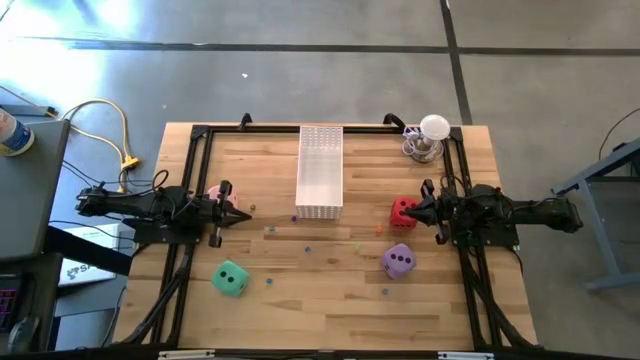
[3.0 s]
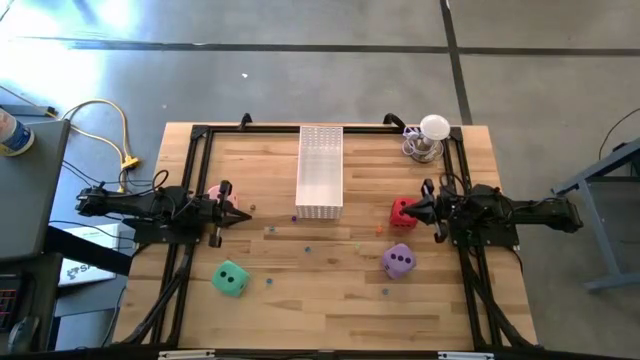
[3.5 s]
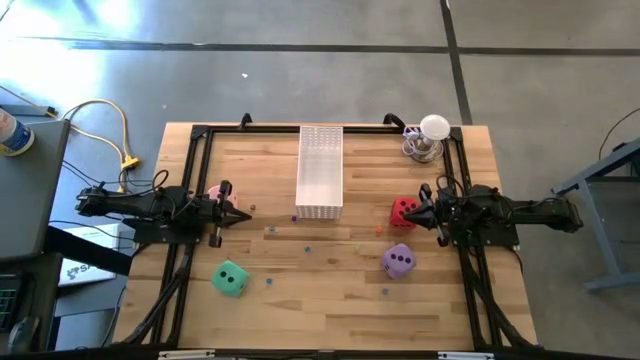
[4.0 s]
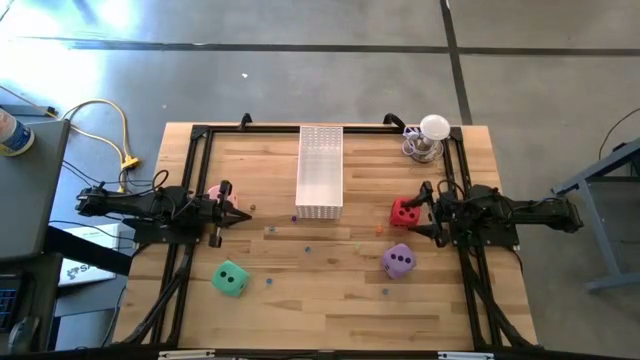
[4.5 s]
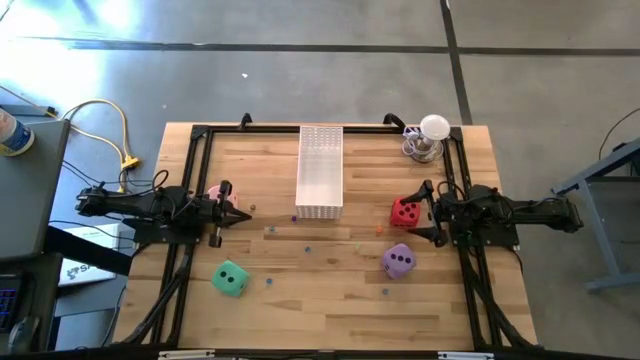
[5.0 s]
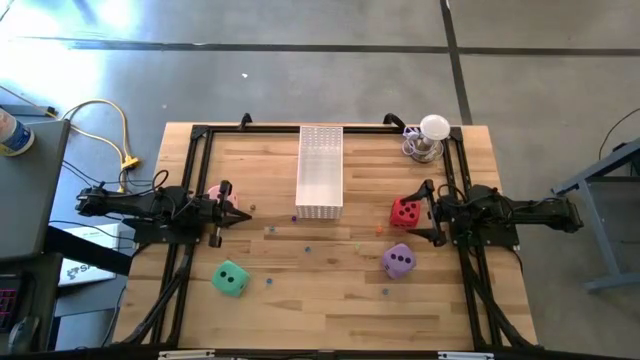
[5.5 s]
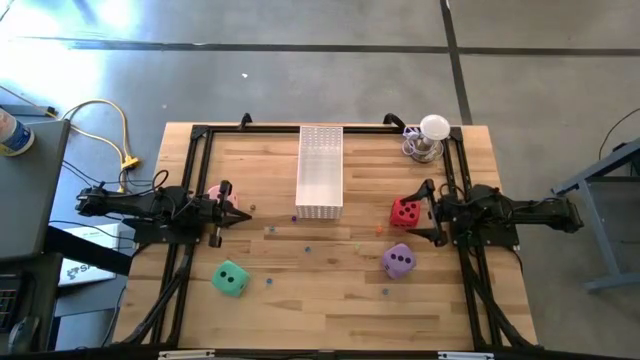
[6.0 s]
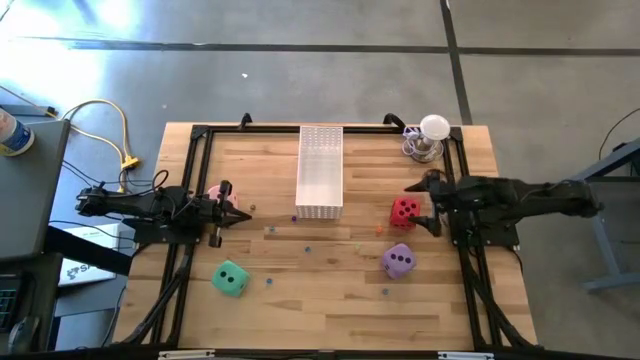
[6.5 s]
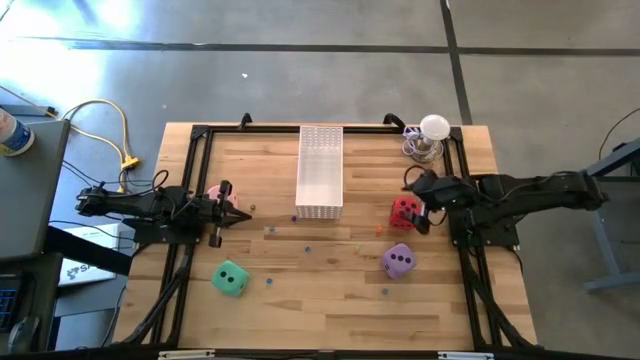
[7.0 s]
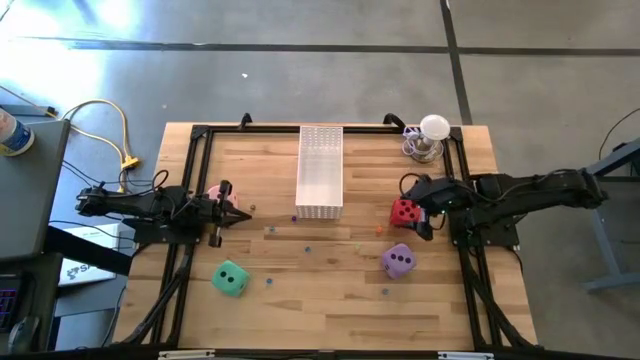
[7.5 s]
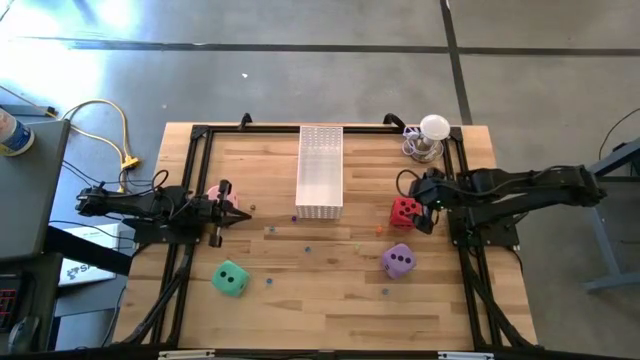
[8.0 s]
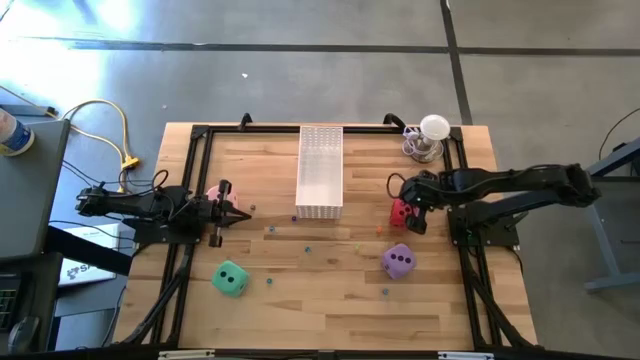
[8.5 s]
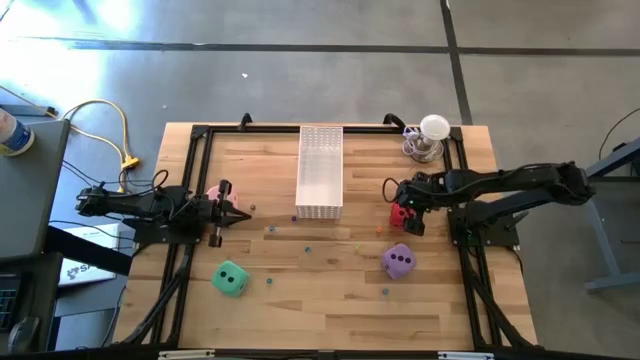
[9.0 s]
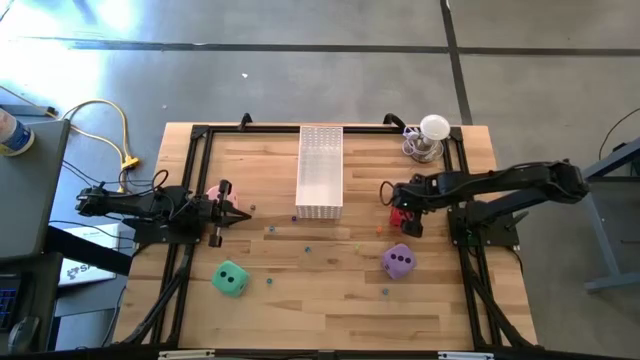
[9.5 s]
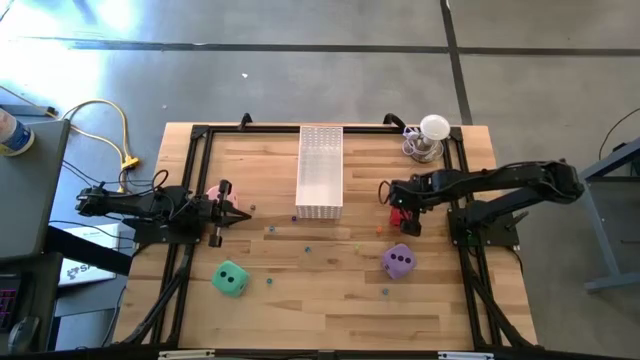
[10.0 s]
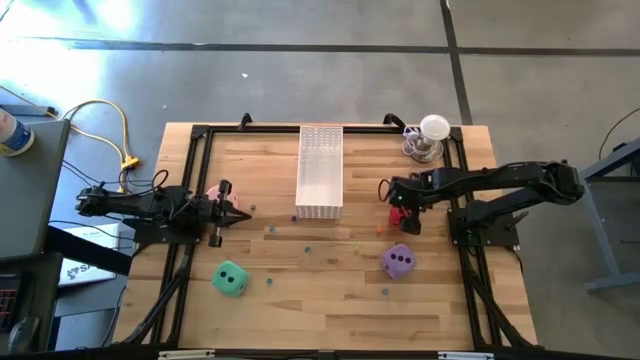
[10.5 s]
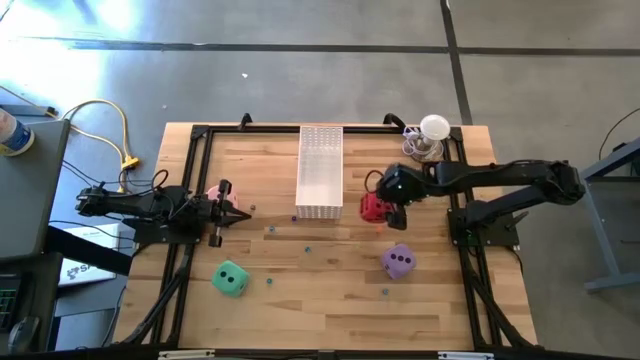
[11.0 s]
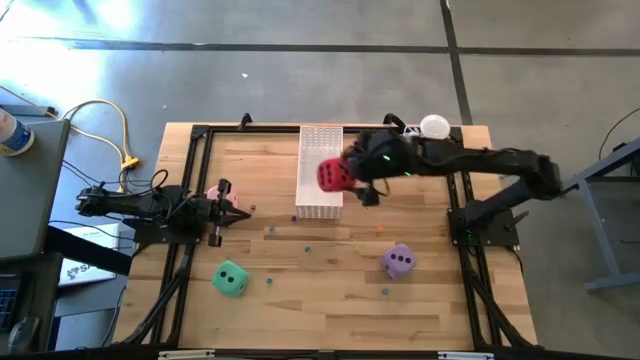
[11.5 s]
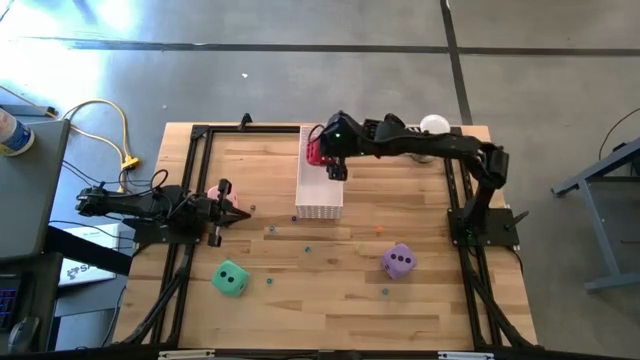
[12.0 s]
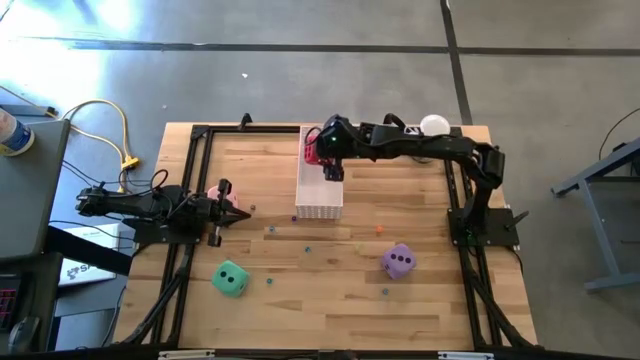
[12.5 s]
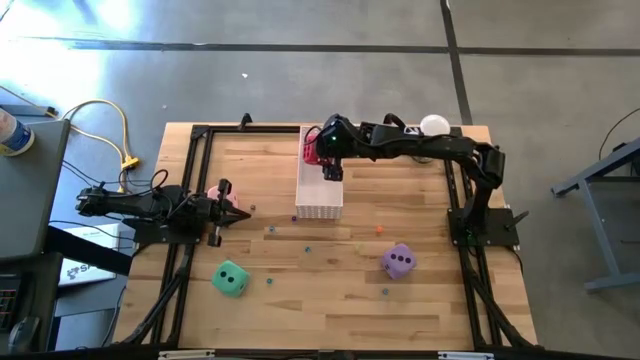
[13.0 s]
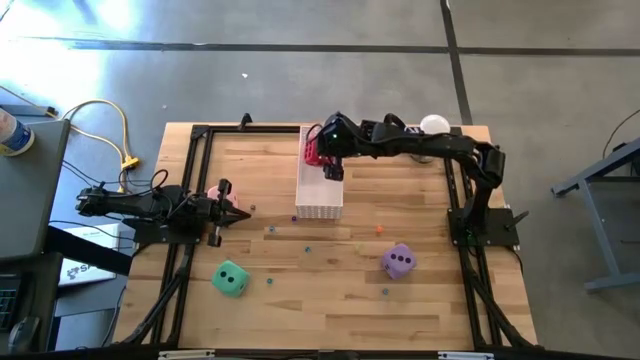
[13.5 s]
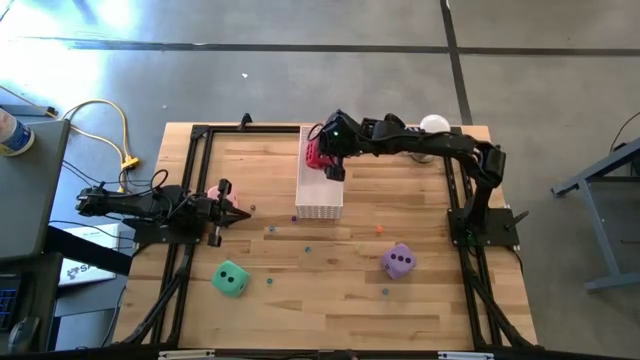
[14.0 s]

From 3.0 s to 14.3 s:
Task: Pick & Place Dice
Put the large red die into the bin

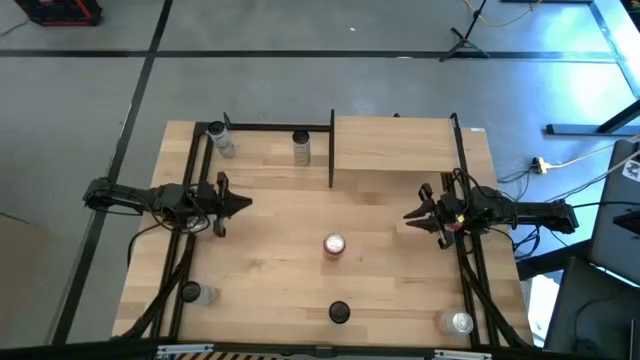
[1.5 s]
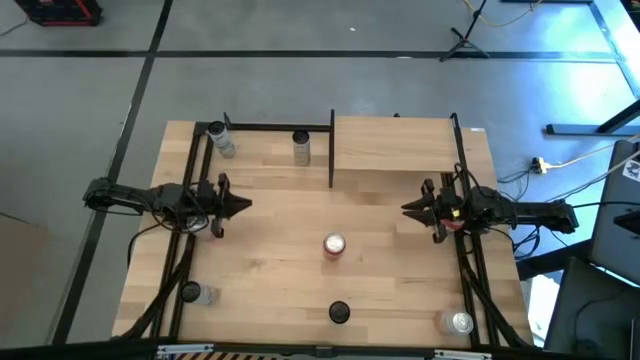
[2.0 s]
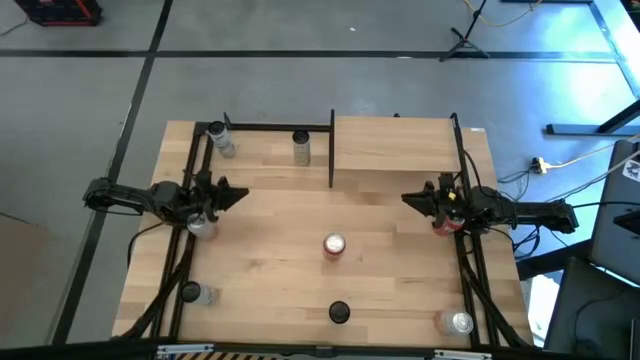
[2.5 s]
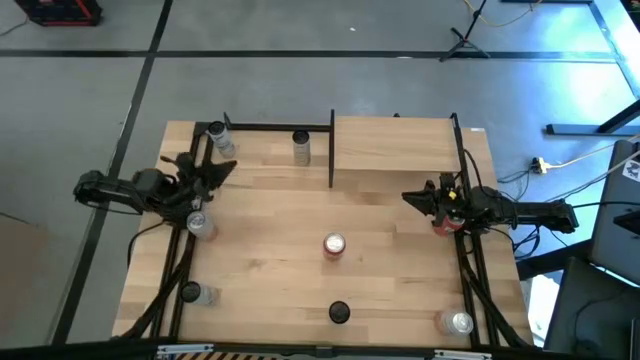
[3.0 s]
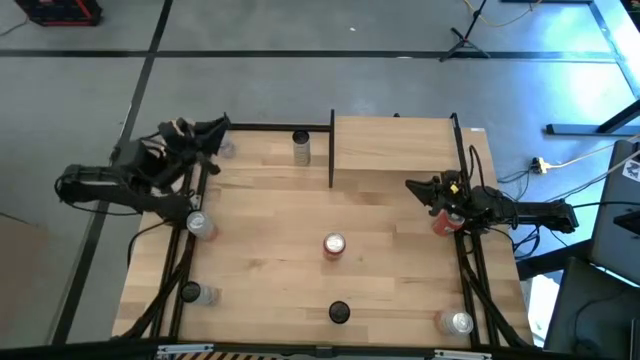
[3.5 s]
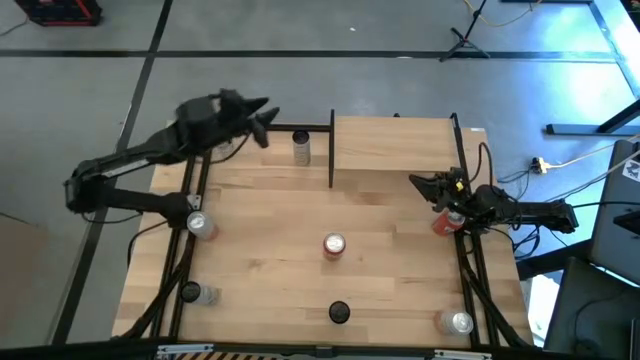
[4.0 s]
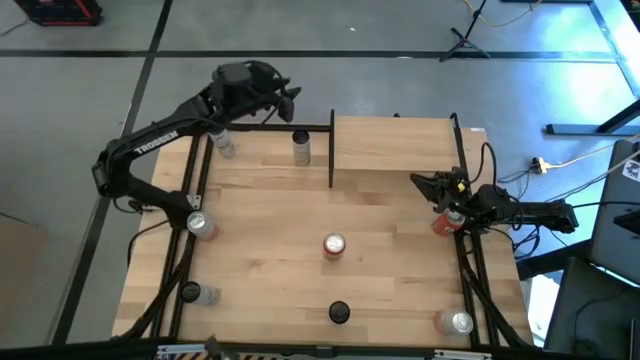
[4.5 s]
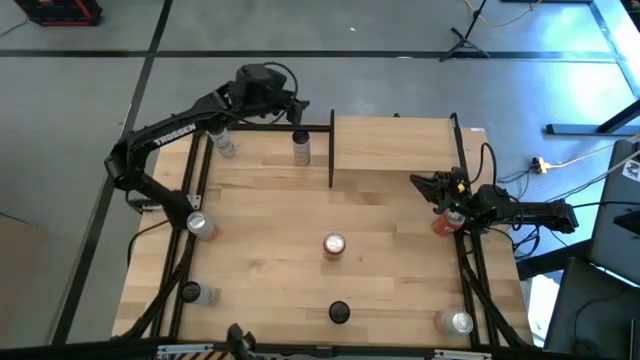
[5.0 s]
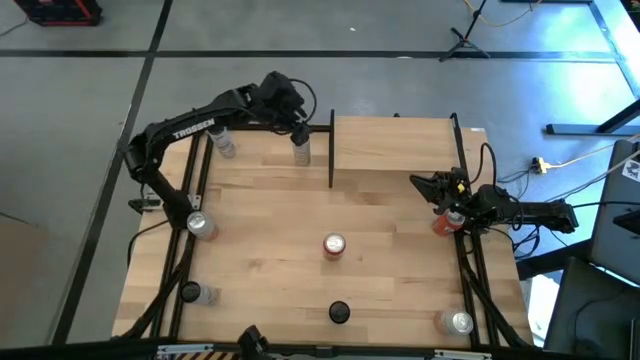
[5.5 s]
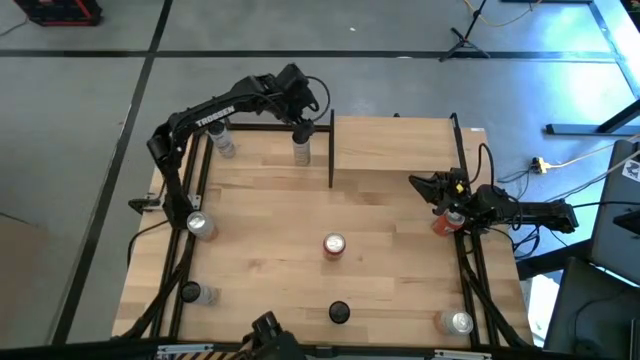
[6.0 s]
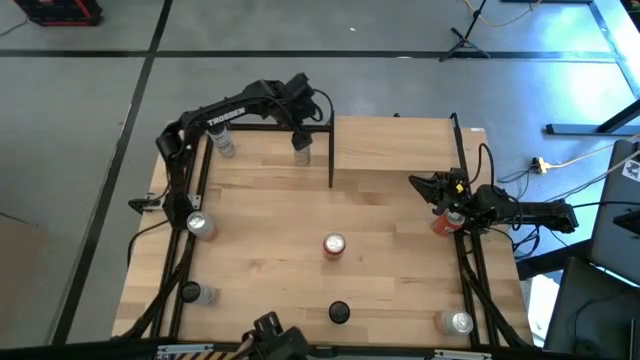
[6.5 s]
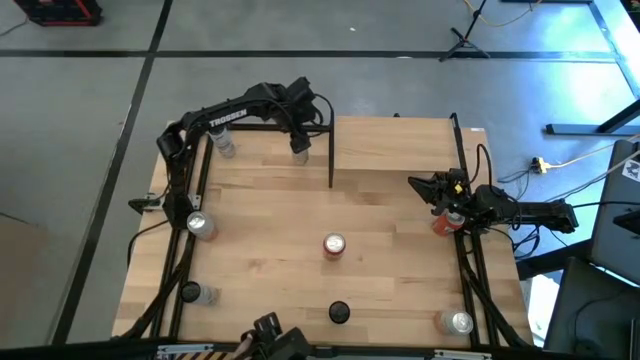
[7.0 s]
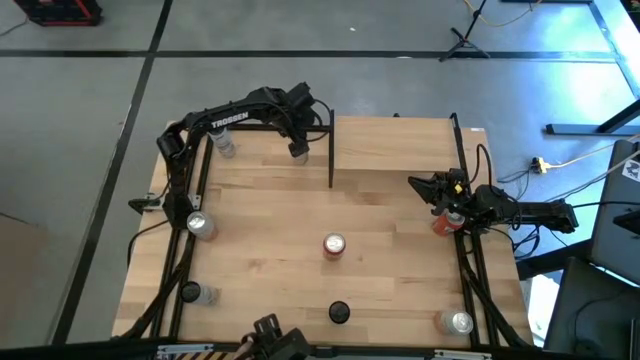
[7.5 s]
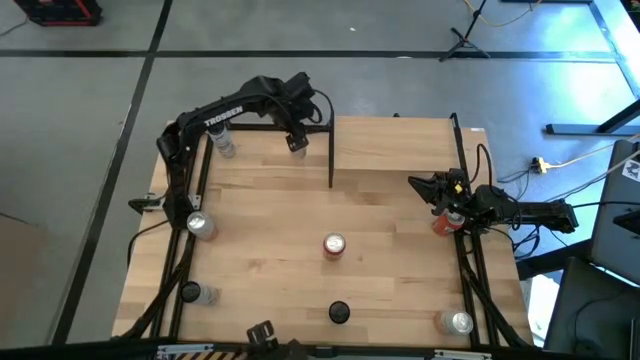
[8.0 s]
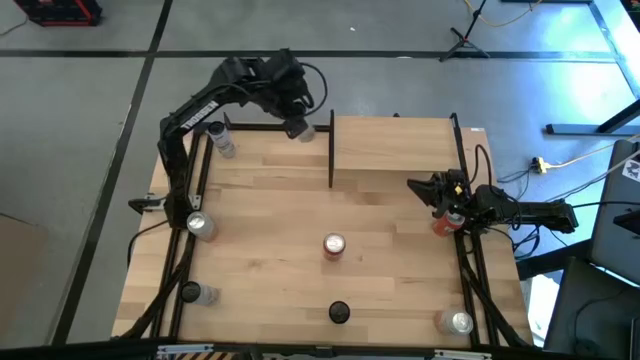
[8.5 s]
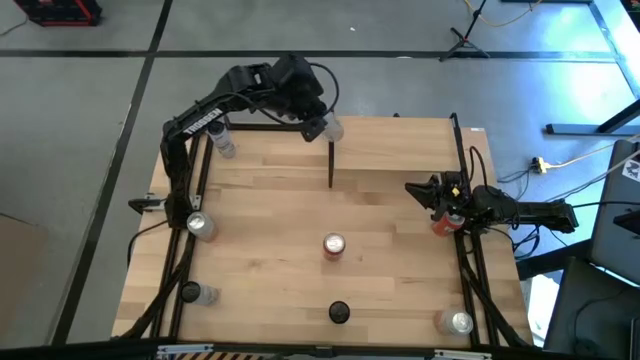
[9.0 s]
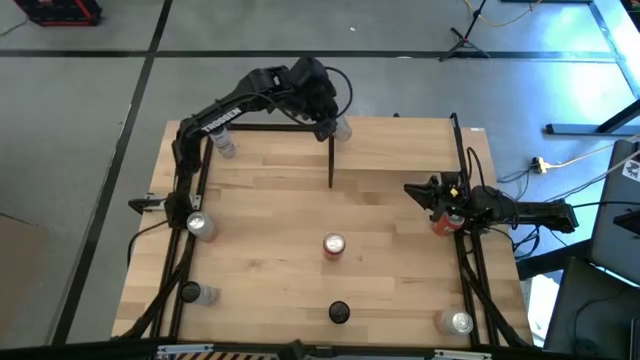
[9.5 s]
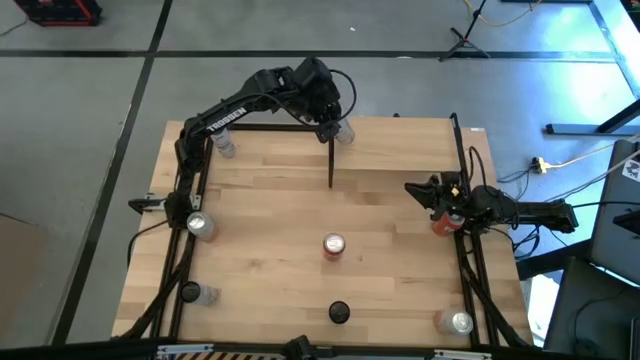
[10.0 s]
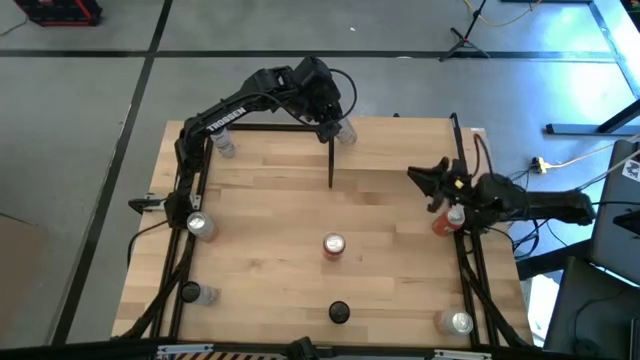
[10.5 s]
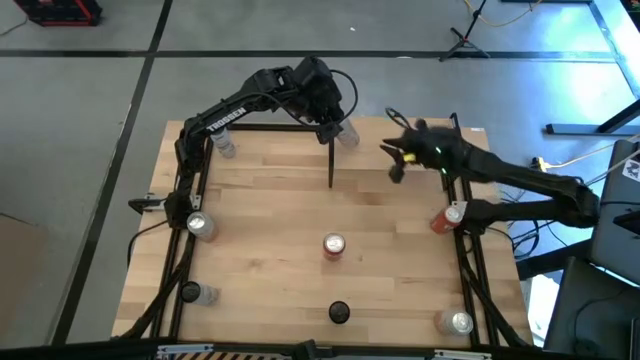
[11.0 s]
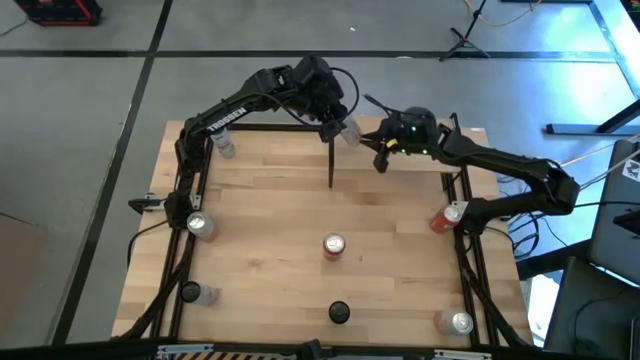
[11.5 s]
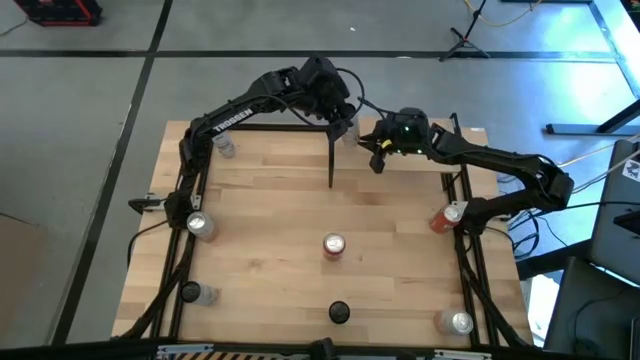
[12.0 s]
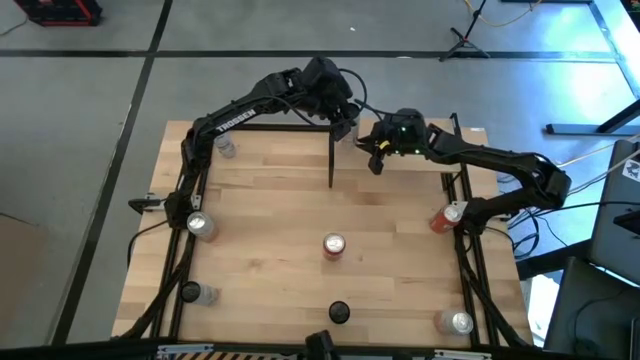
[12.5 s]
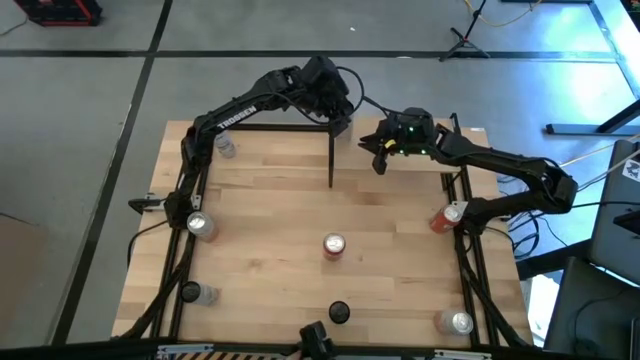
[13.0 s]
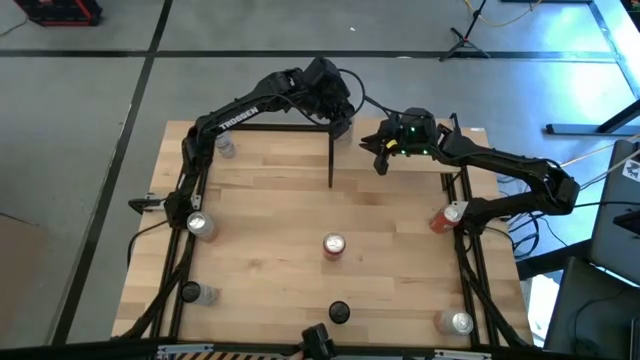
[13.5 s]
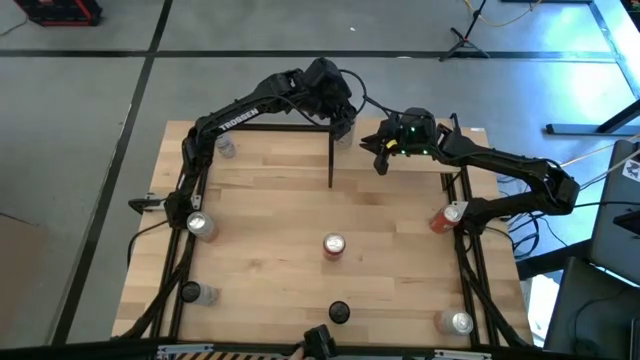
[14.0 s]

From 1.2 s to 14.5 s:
Task: Place canned beverage on shelf
Put the top white yellow soda can on the shelf
